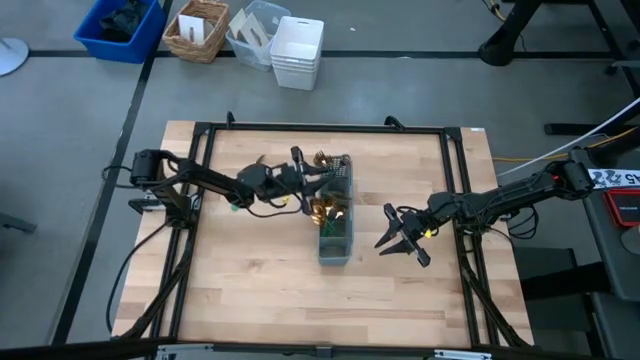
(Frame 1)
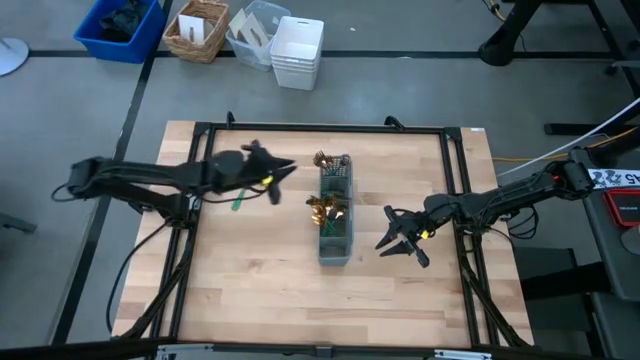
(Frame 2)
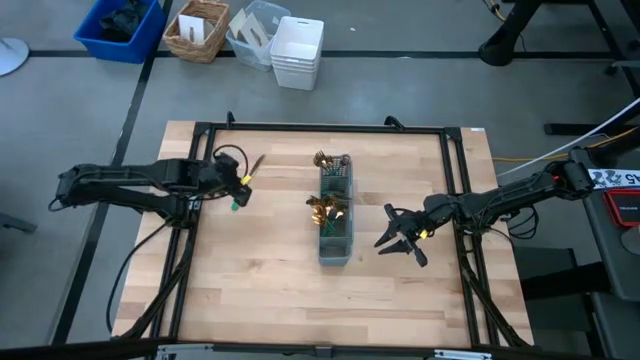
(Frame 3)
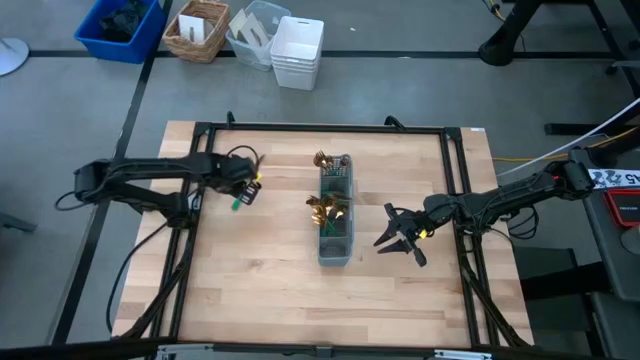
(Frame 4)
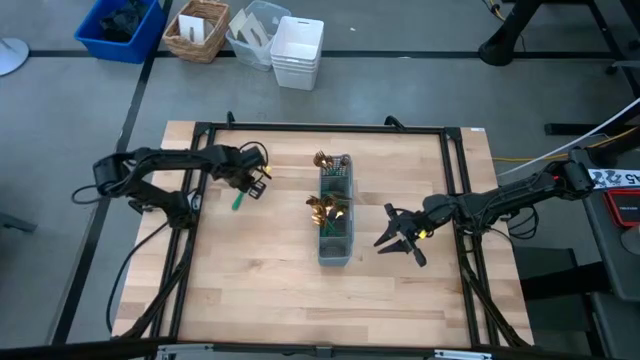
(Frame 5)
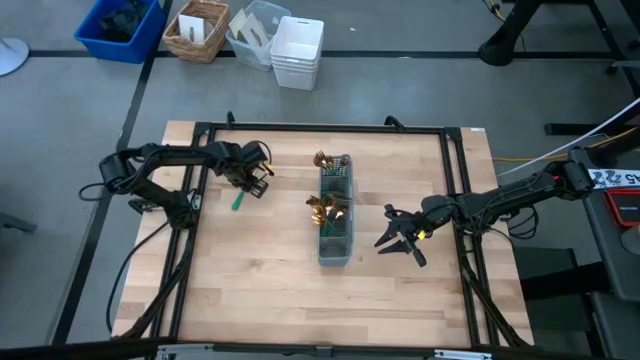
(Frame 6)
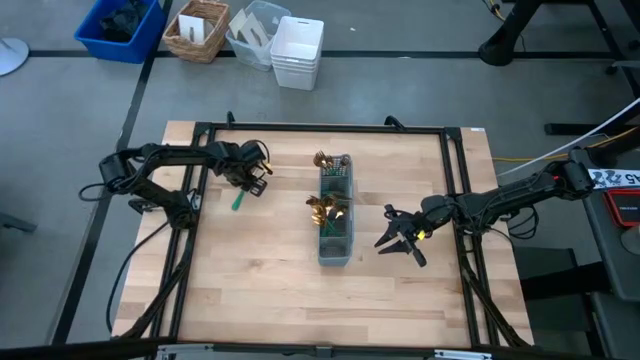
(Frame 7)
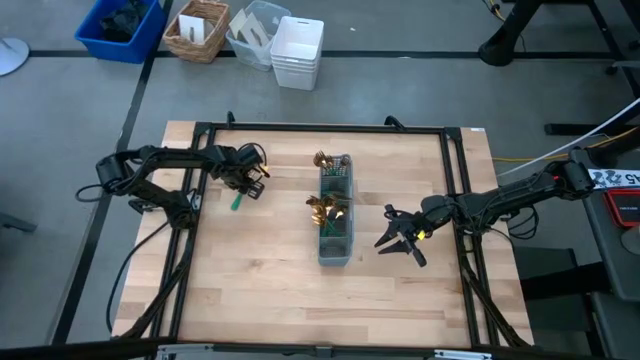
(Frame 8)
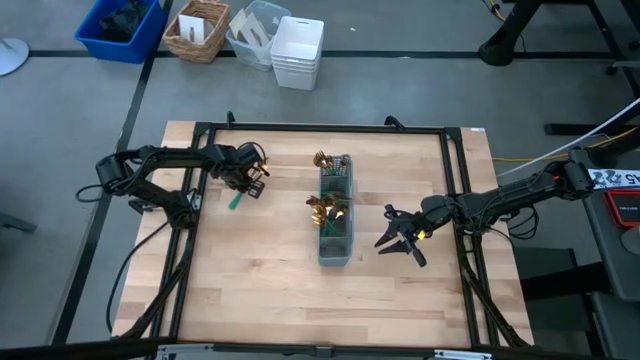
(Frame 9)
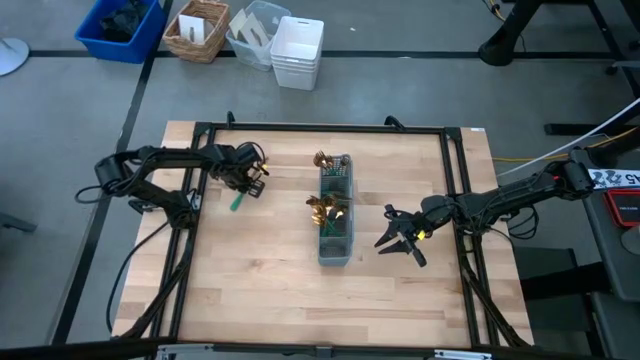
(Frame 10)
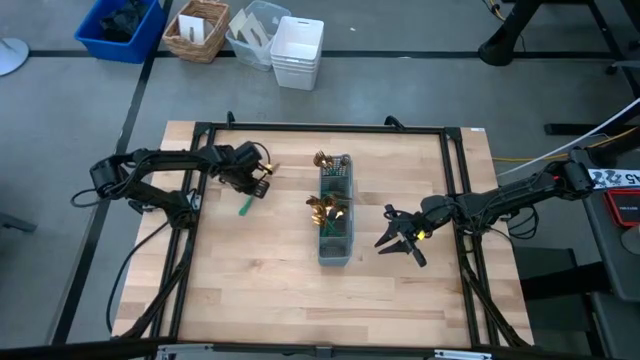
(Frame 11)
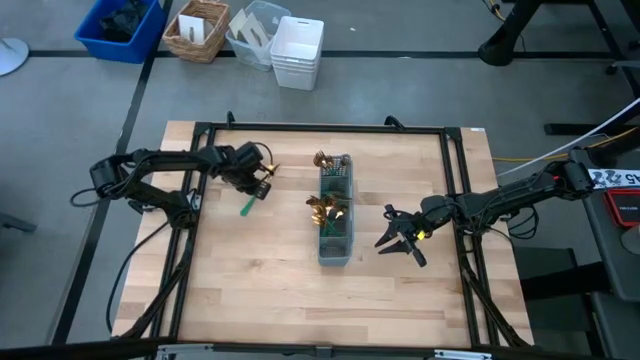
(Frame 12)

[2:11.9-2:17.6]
Task: Sort silverware
Put the green knife into the utensil rack

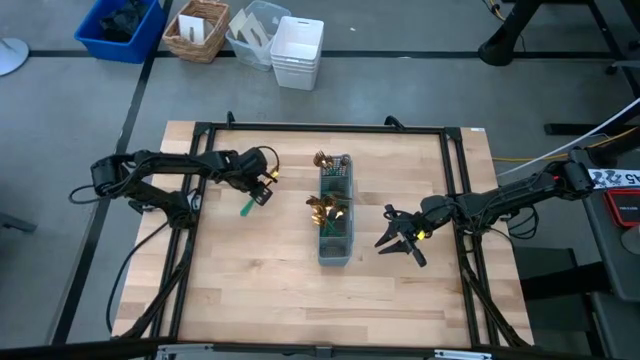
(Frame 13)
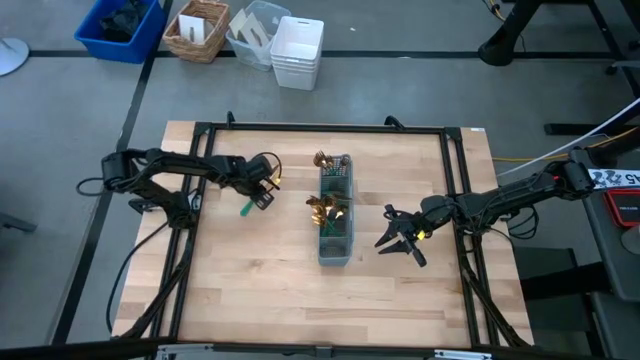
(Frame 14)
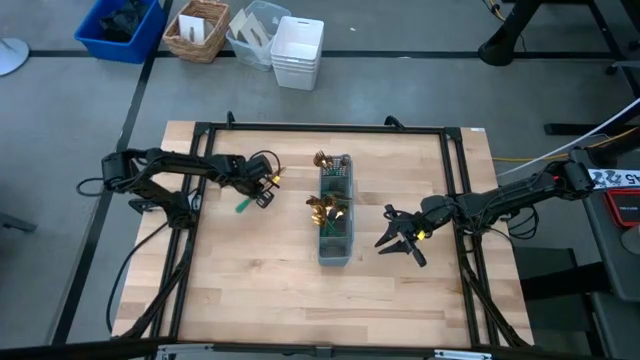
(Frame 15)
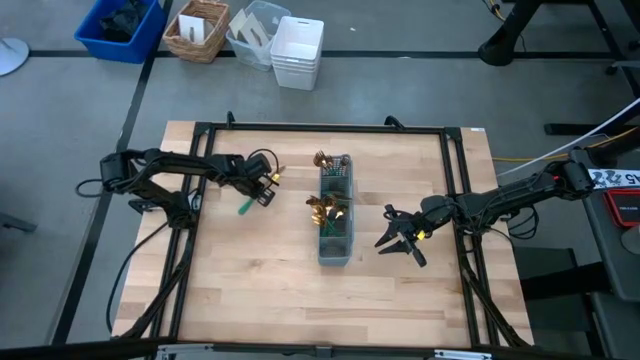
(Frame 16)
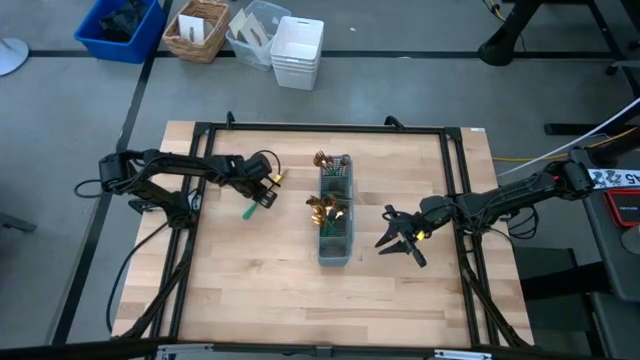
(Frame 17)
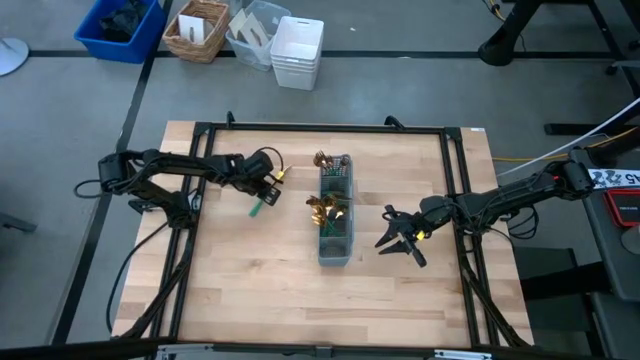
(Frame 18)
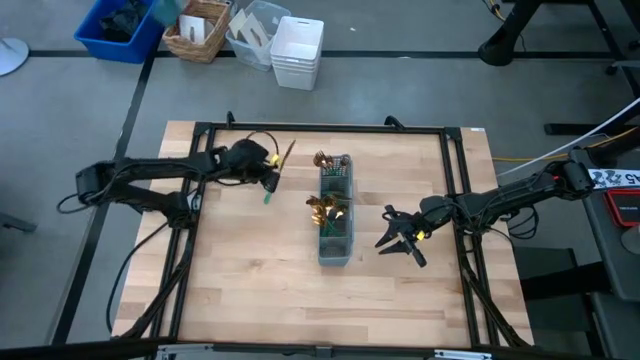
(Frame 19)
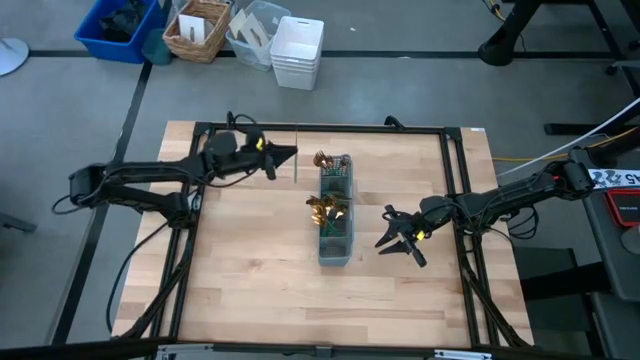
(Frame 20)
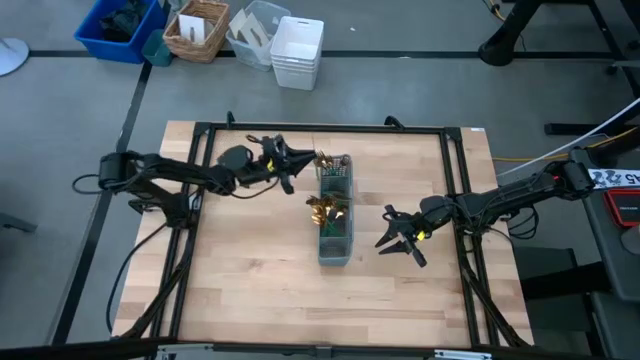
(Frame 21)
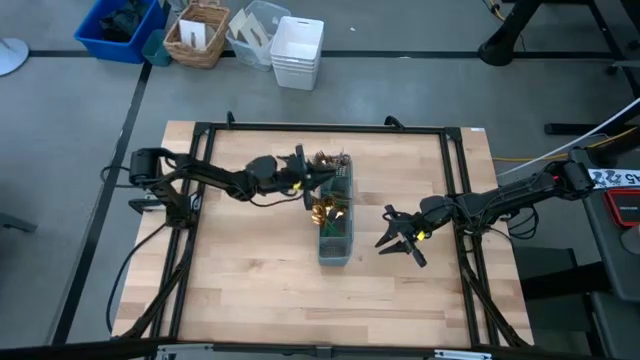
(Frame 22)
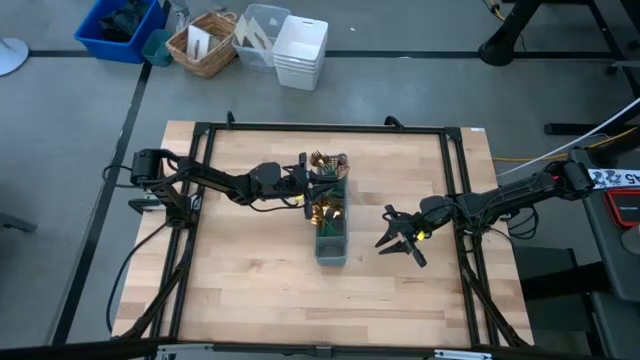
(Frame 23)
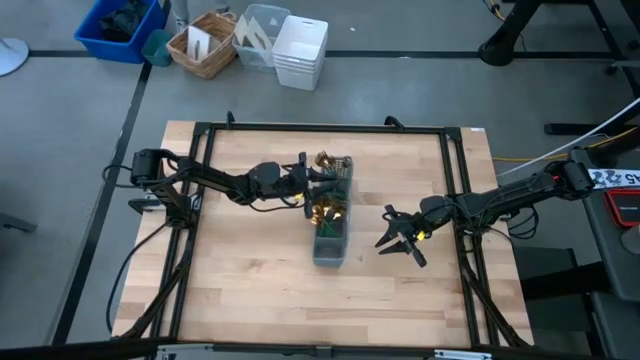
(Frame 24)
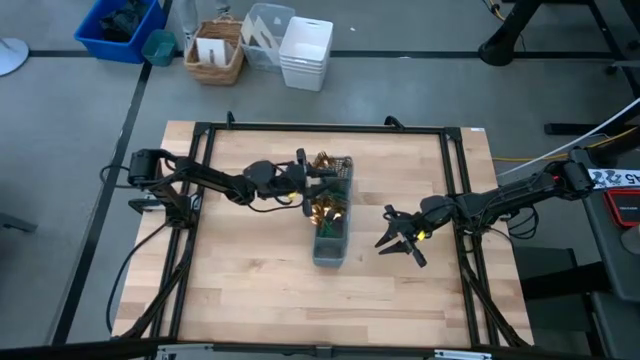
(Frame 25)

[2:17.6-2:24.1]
Put the green knife into the utensil rack

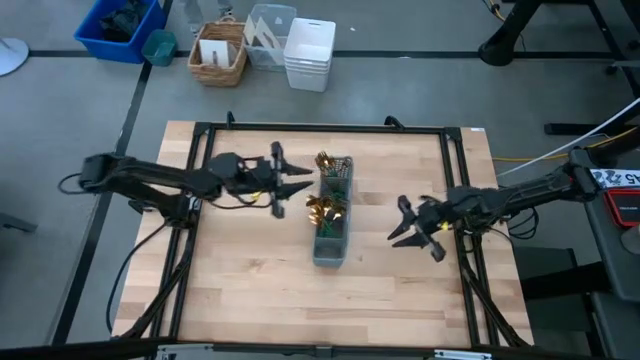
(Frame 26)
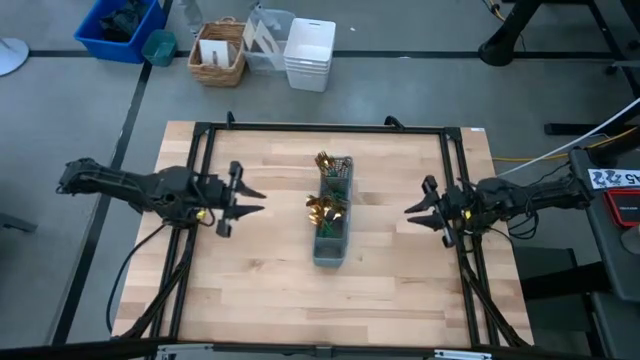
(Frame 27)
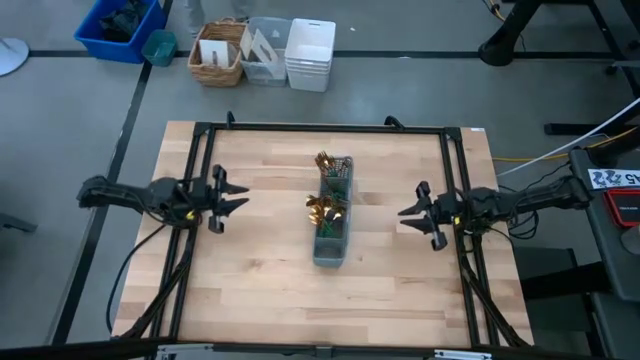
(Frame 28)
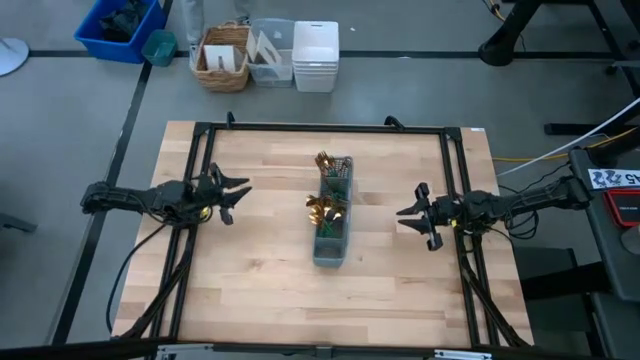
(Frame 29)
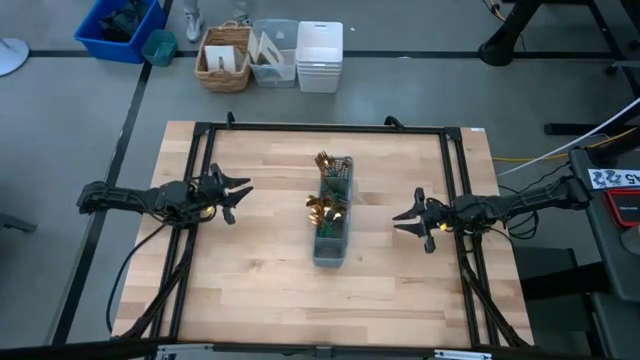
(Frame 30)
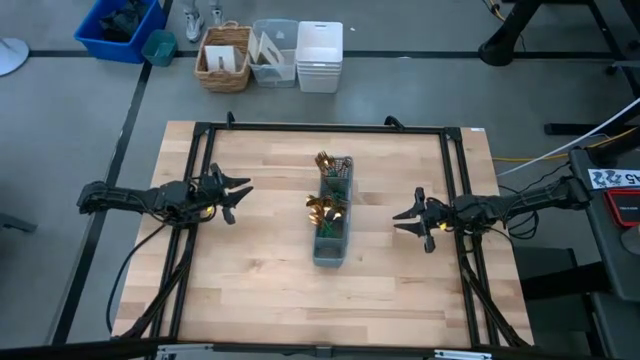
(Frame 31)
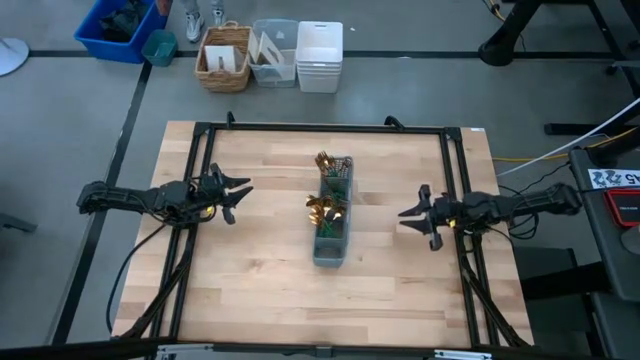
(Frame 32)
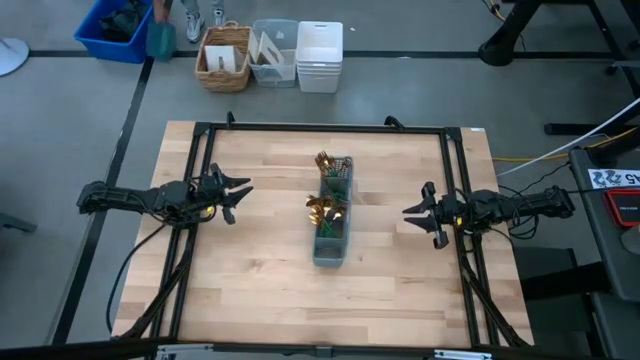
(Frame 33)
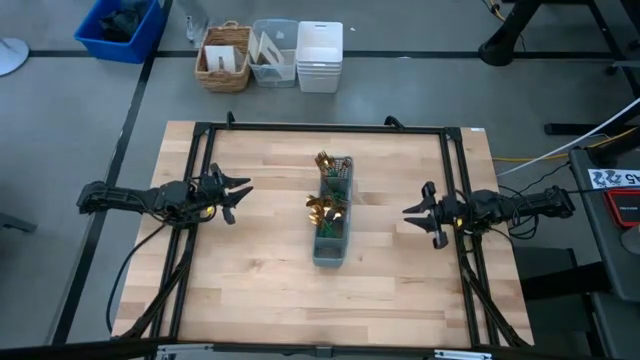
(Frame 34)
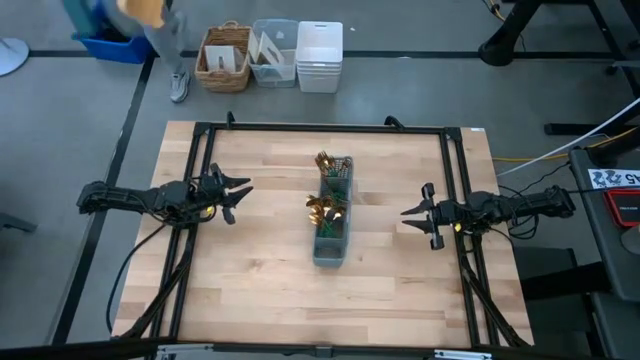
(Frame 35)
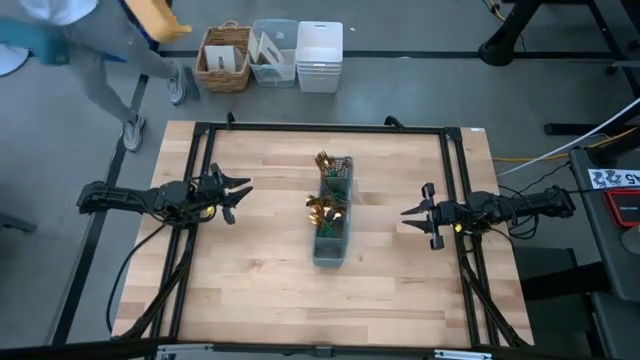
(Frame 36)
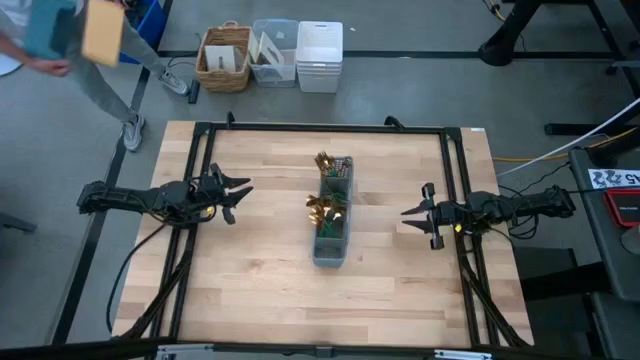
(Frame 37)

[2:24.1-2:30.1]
Return to Home Position

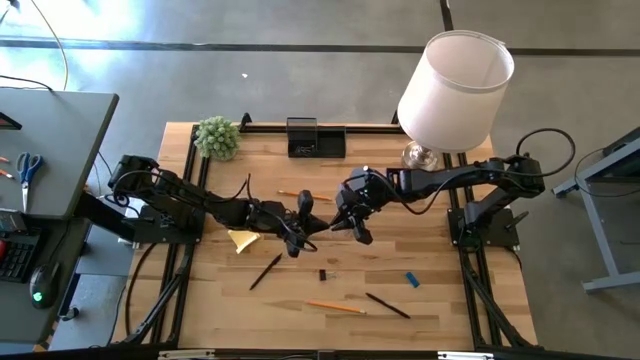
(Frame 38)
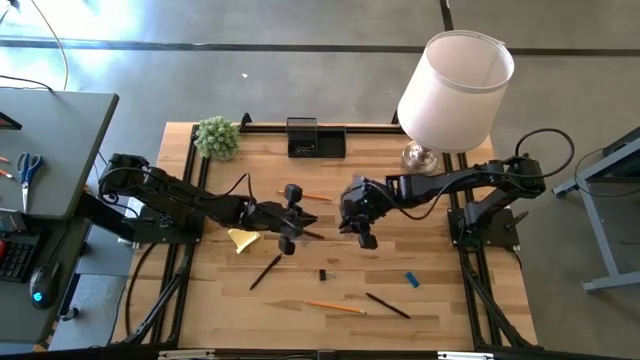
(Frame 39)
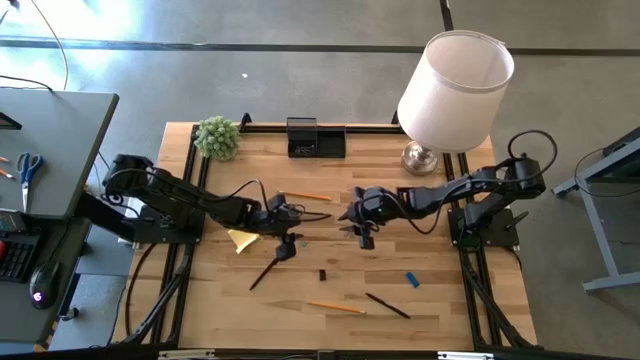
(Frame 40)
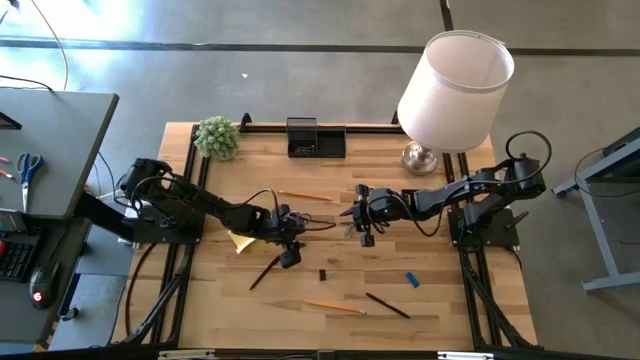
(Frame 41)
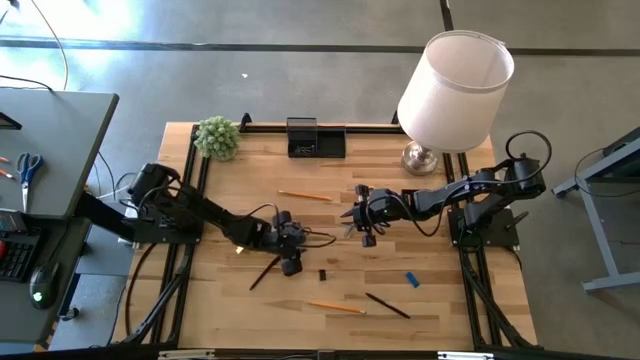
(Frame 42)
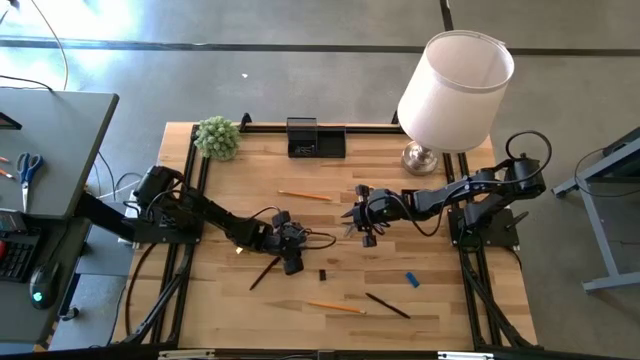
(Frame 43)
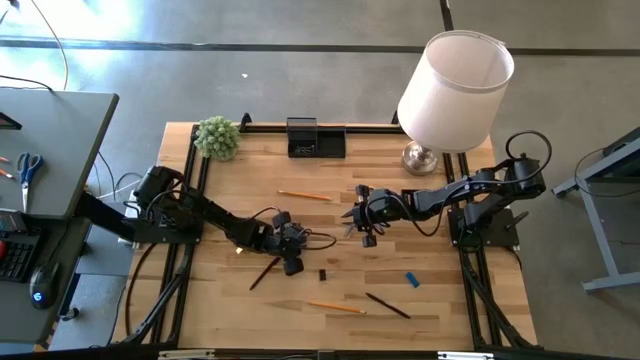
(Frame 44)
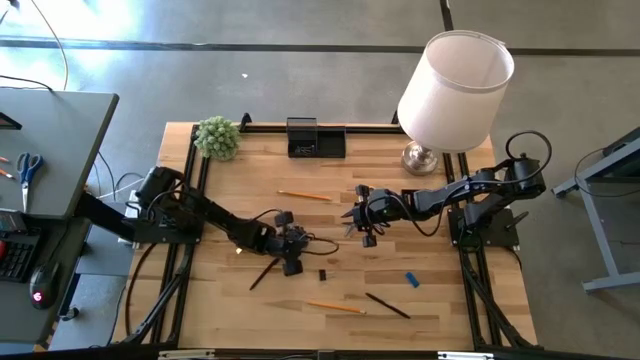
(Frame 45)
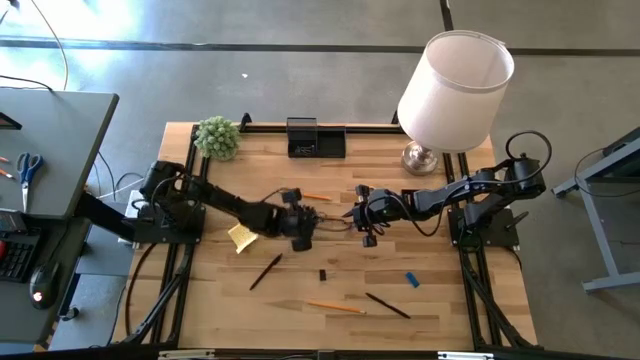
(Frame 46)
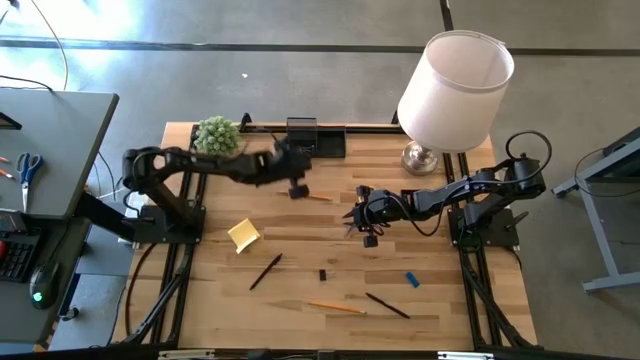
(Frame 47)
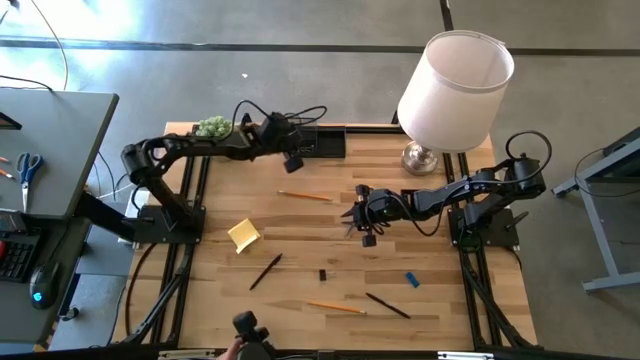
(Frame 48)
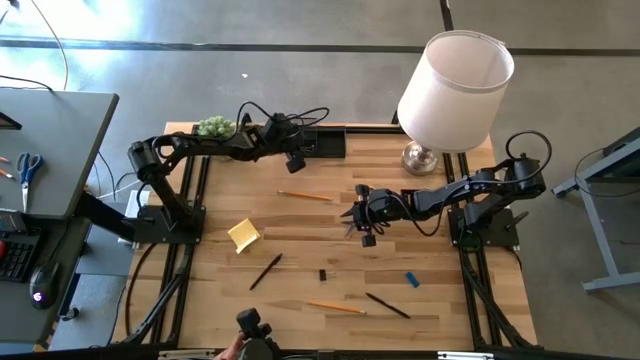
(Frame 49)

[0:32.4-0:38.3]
Task: Pick and place office supplies into organizer
Put the blue binder clip into the bottom left slot of the desk organizer
